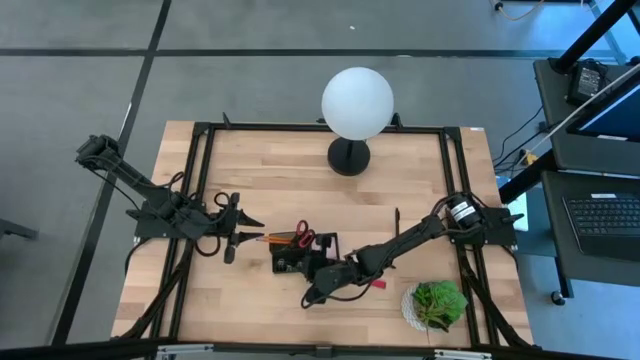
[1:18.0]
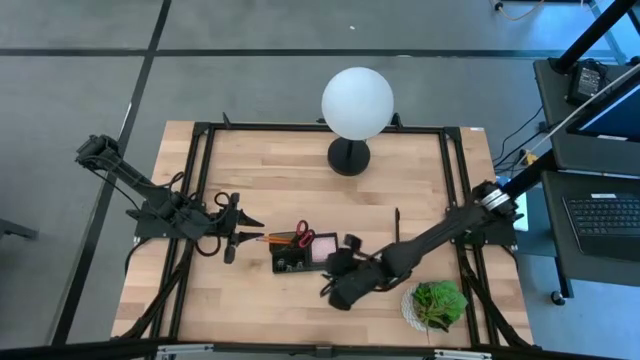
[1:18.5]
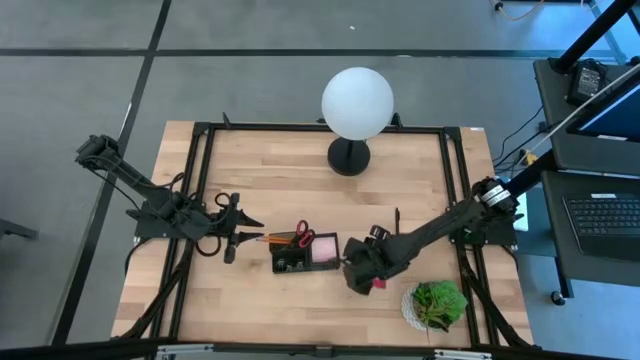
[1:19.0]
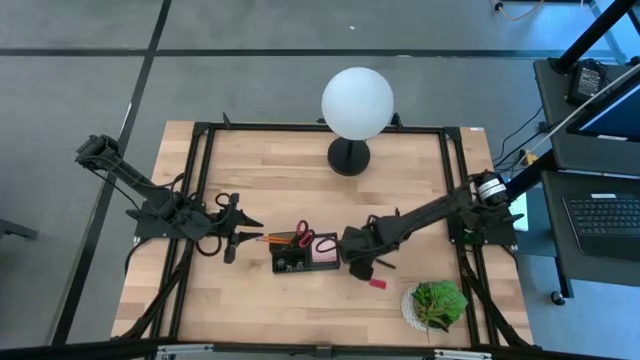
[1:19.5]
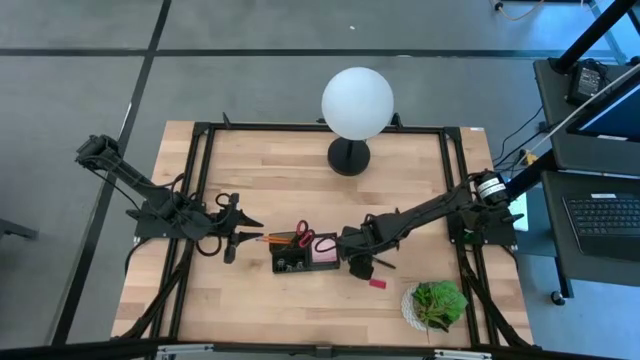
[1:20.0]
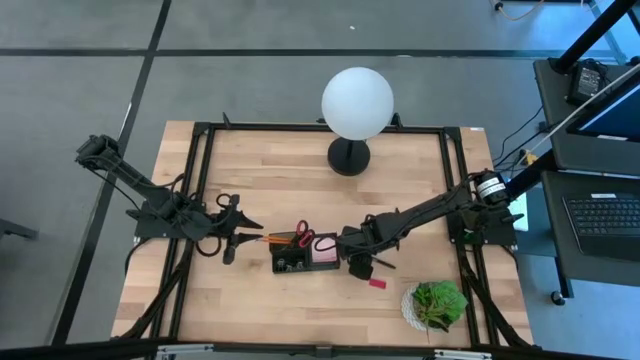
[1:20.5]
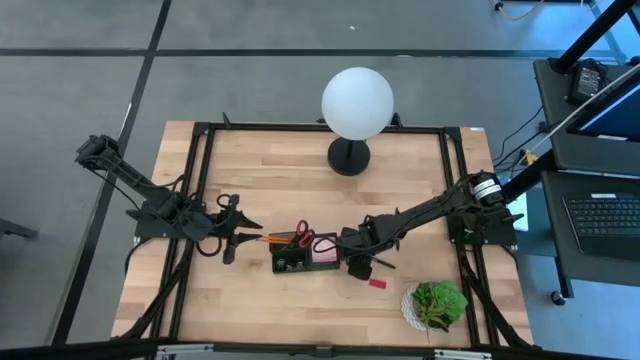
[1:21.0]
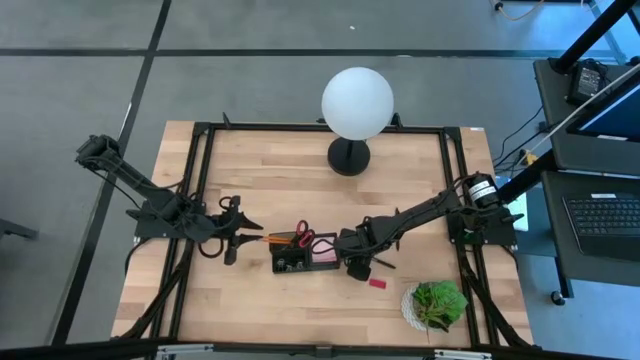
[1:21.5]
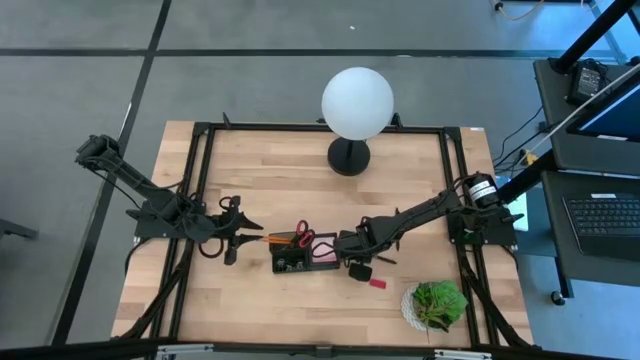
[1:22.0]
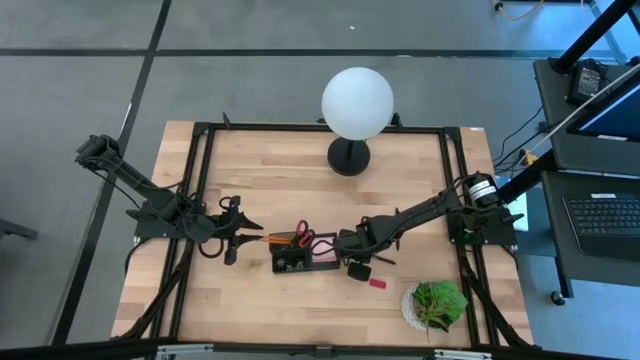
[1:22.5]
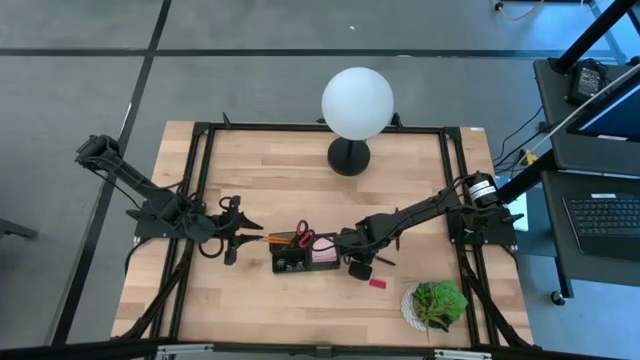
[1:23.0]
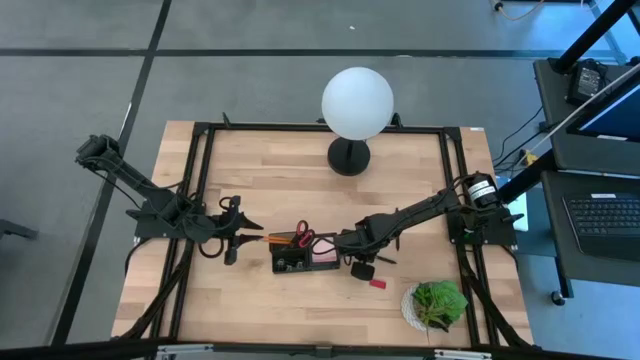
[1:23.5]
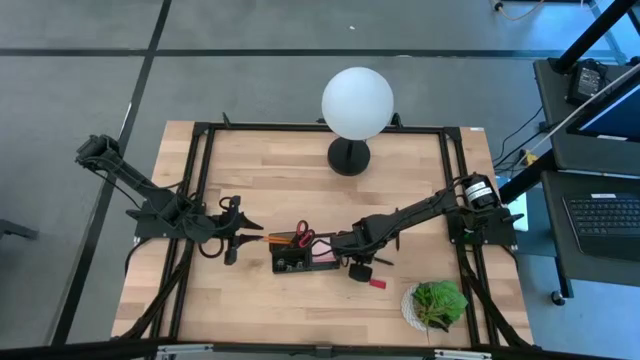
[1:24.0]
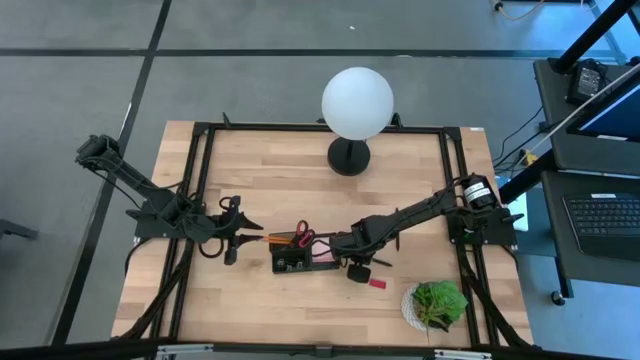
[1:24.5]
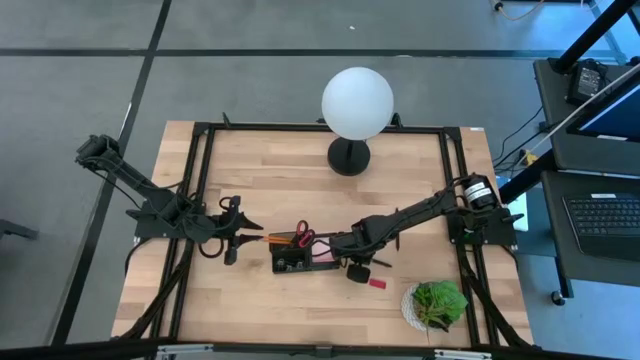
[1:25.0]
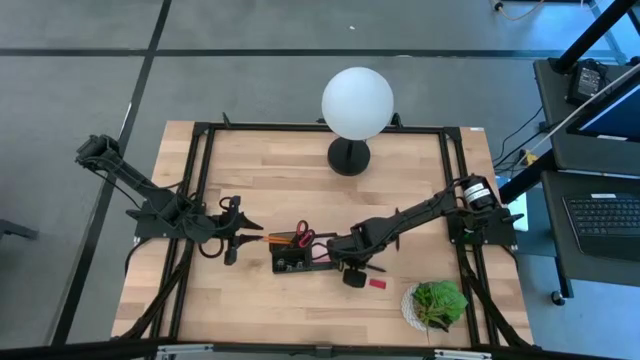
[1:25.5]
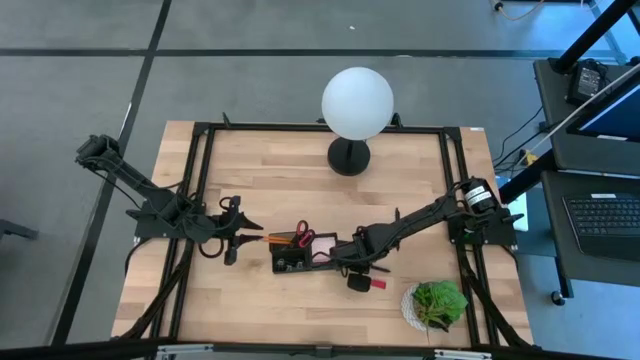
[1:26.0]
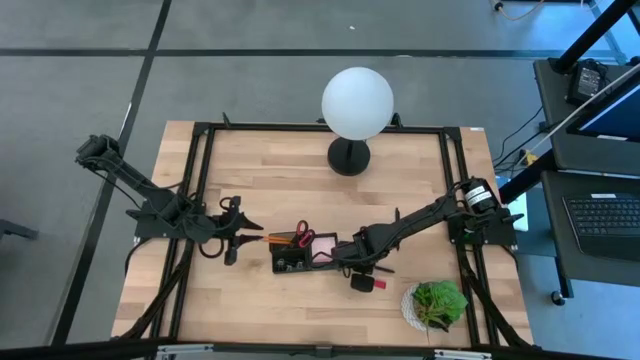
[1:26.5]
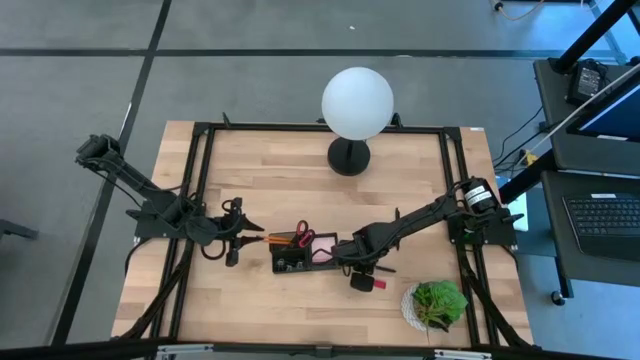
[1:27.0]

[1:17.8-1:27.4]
Task: Pick and place office supplies into organizer
Put the bottom black pen into the black desk organizer

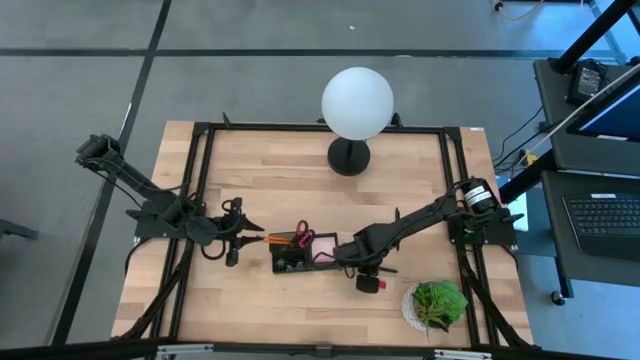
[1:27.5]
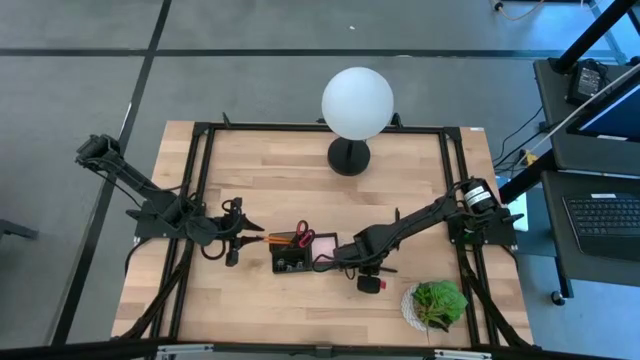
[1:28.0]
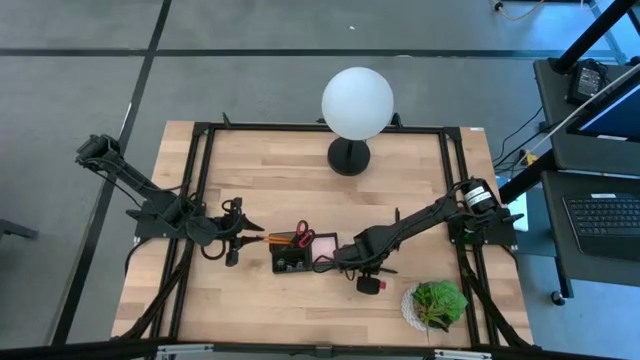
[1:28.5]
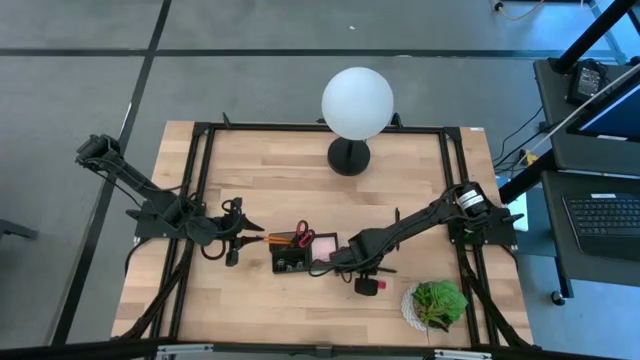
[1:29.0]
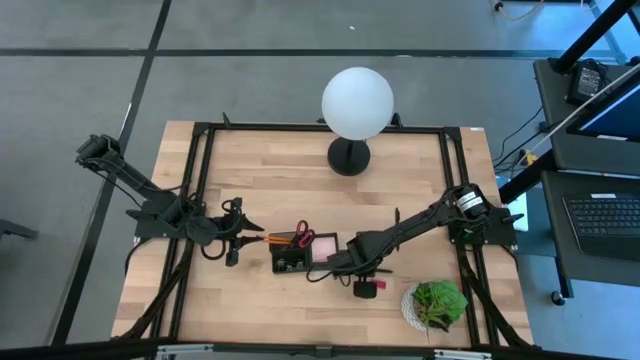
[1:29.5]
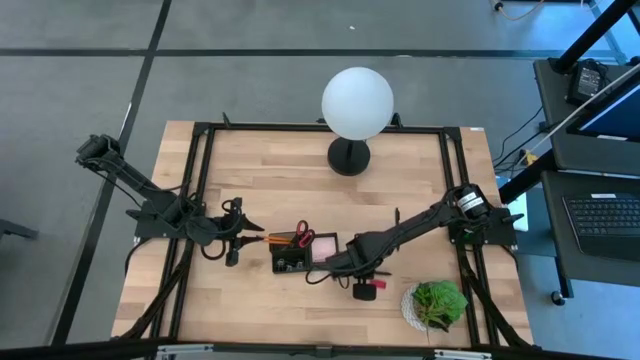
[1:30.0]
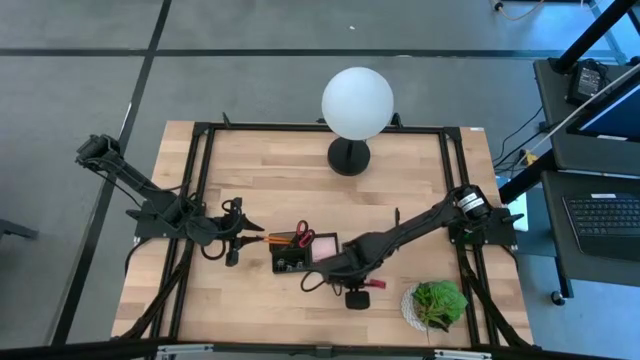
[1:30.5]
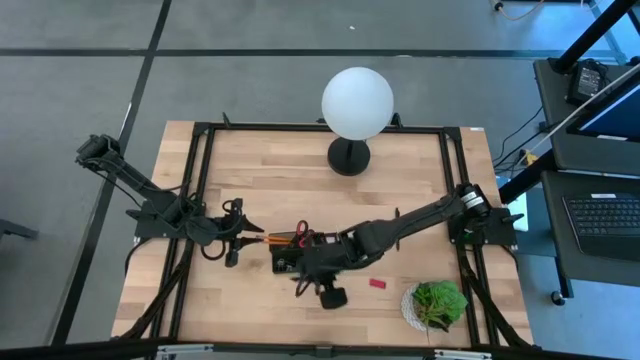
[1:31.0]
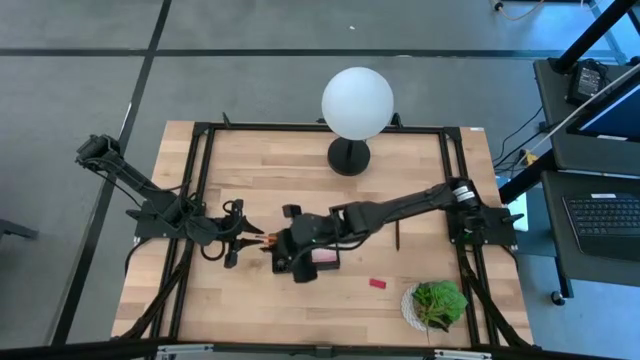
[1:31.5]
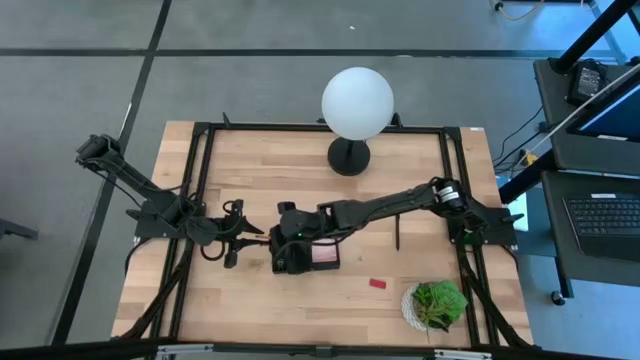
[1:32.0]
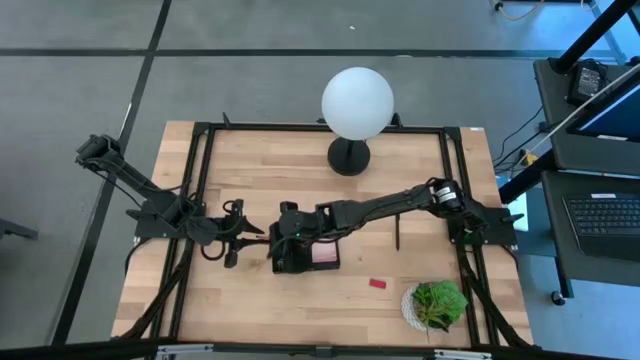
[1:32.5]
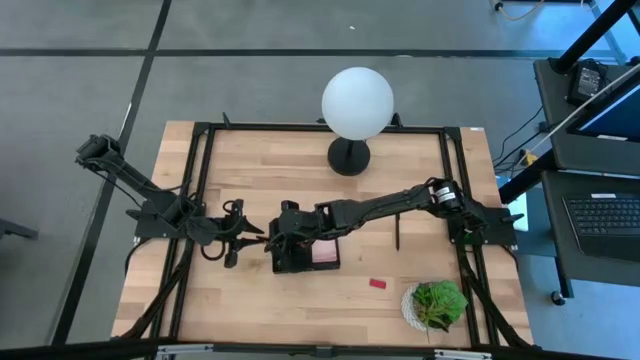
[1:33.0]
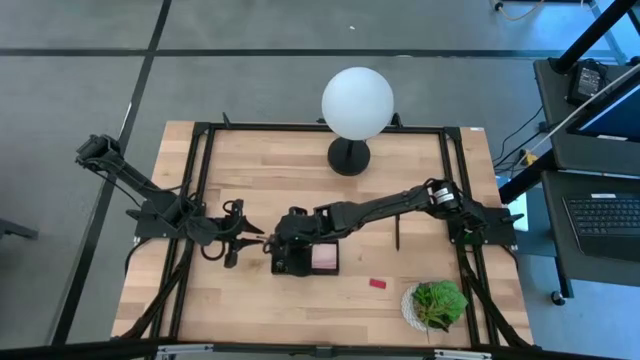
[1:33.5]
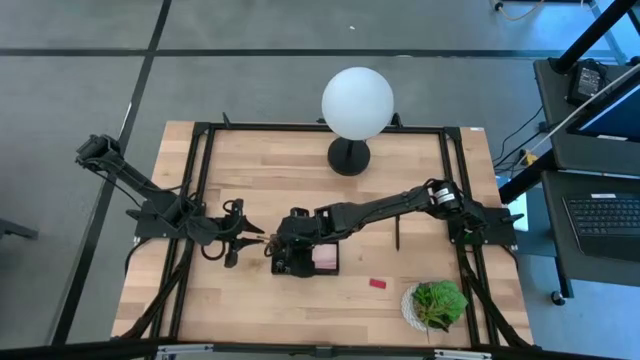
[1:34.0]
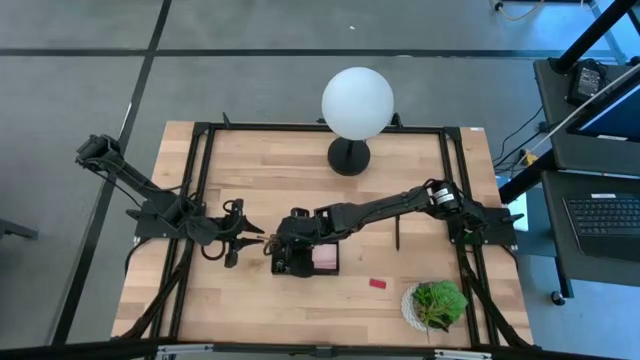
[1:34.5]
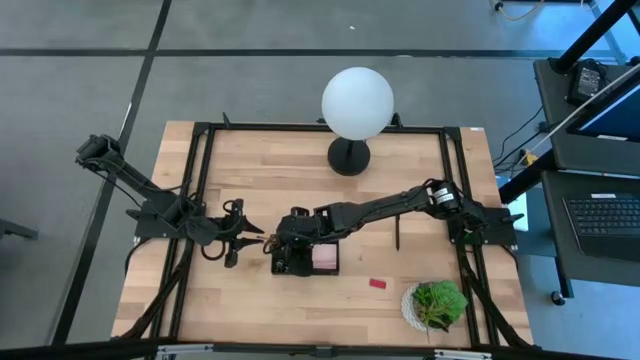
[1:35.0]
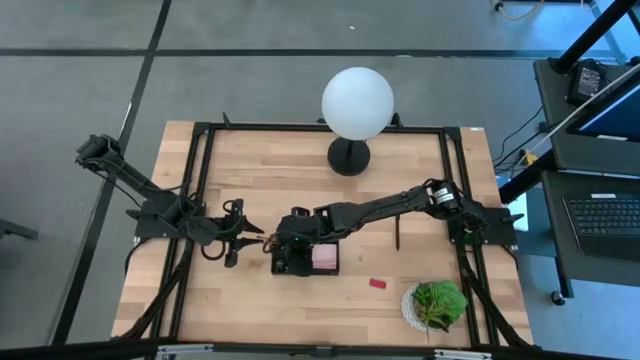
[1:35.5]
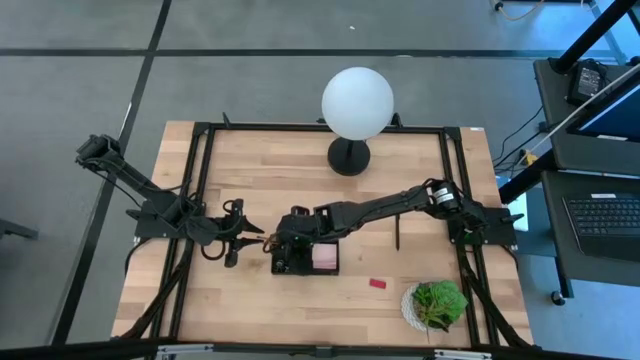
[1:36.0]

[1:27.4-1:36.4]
Put the bottom black pen into the black desk organizer

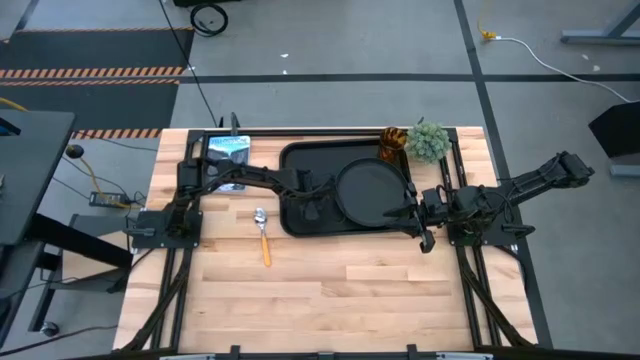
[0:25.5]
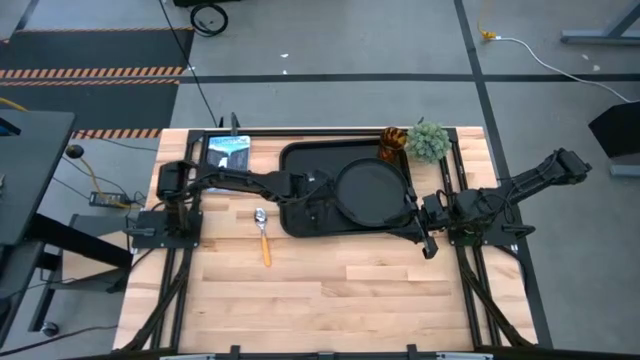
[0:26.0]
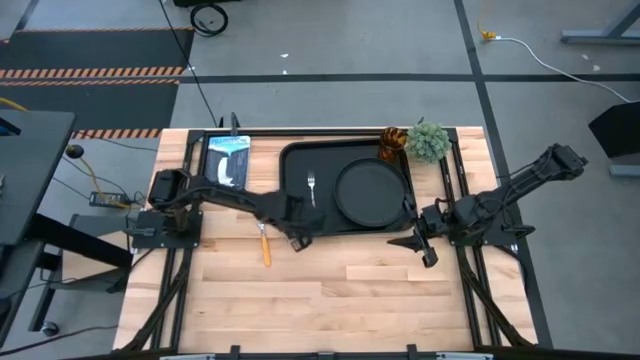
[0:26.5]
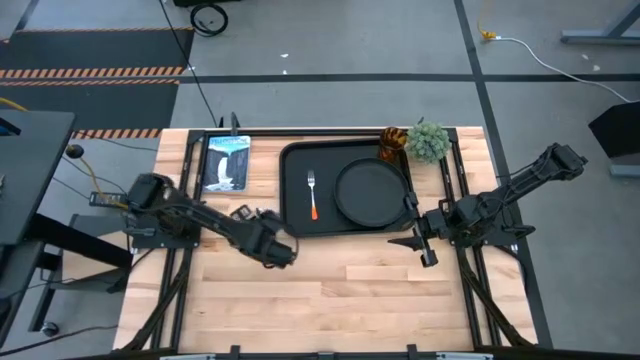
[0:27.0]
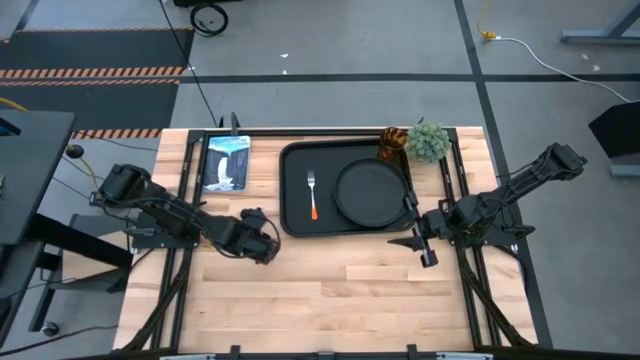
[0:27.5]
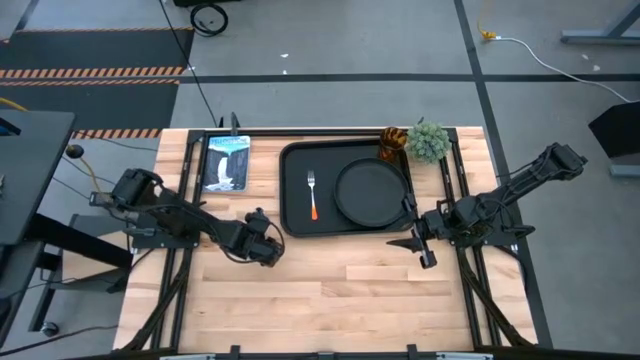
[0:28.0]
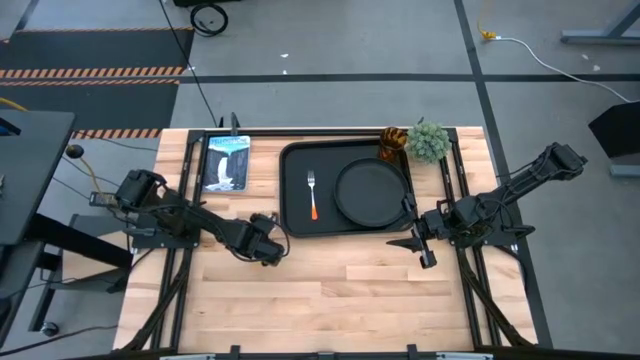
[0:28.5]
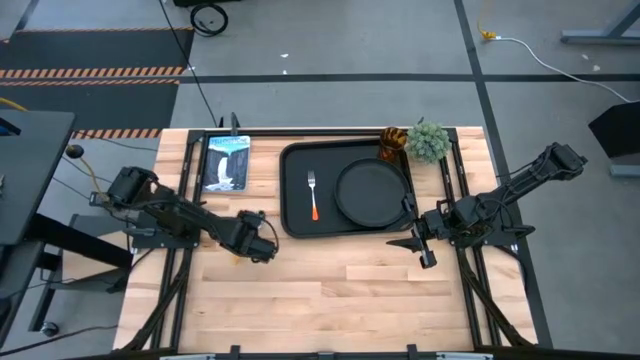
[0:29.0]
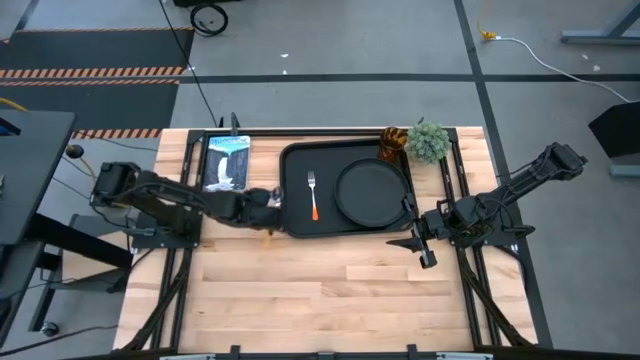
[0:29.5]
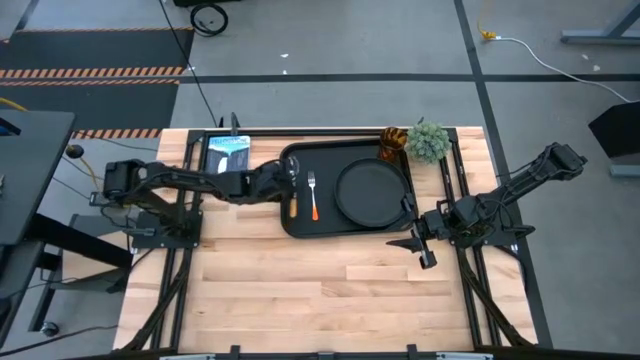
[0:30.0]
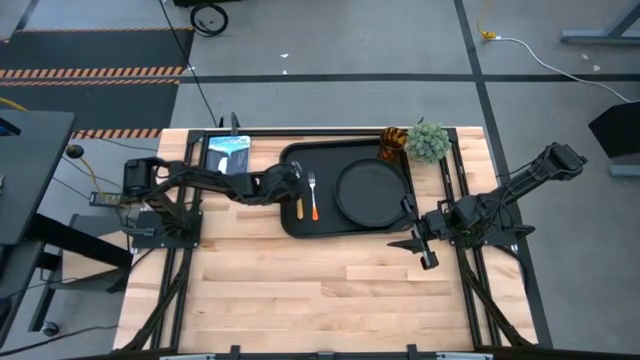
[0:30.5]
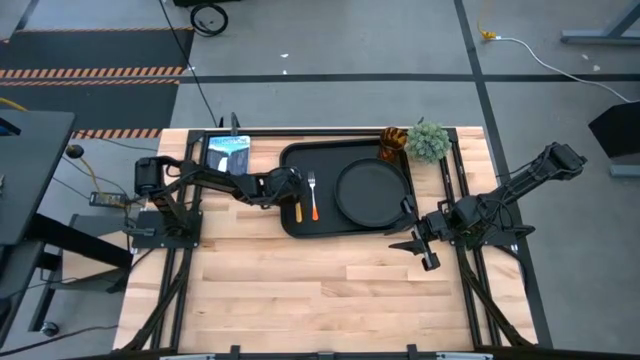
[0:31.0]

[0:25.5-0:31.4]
Task: Pick and place plate/cup/fork/spoon on tray
Put the yellow spoon to the left of the orange fork on the black tray
